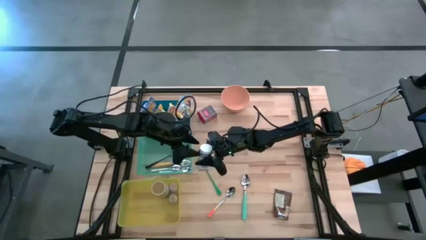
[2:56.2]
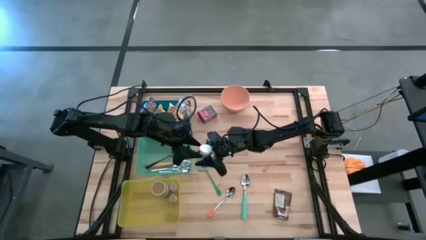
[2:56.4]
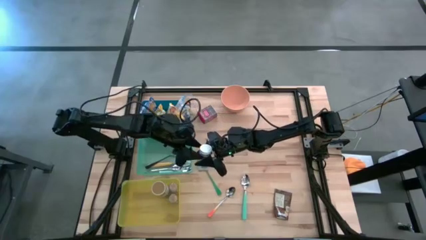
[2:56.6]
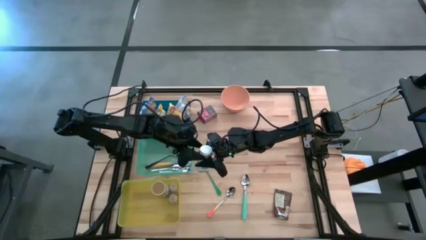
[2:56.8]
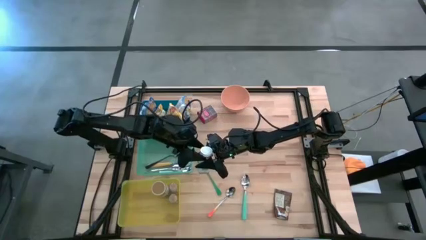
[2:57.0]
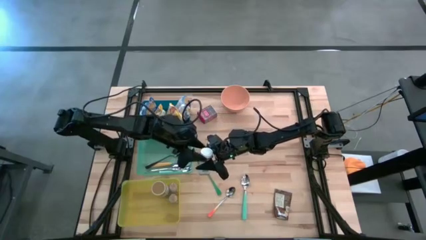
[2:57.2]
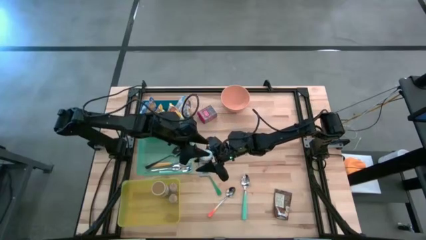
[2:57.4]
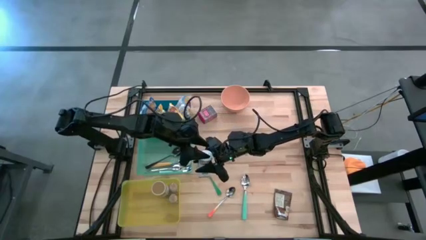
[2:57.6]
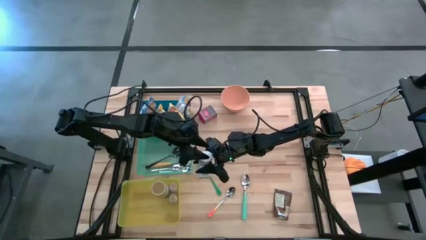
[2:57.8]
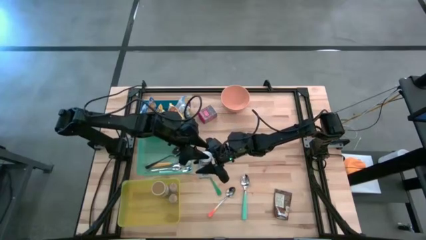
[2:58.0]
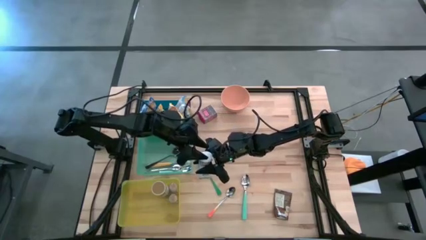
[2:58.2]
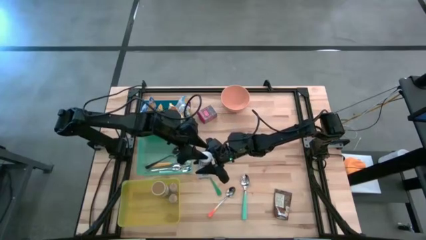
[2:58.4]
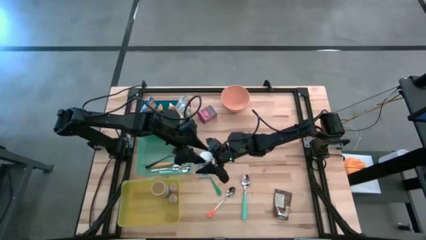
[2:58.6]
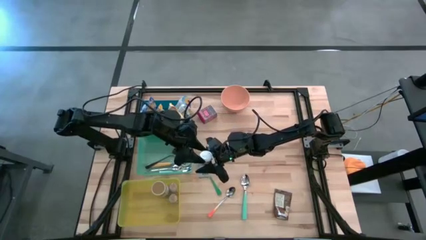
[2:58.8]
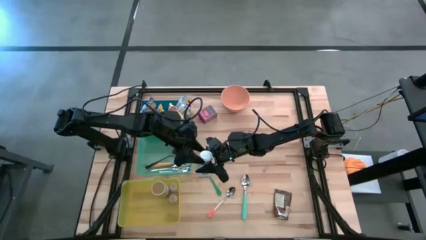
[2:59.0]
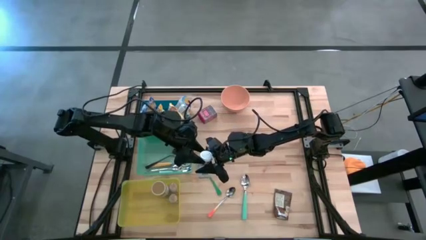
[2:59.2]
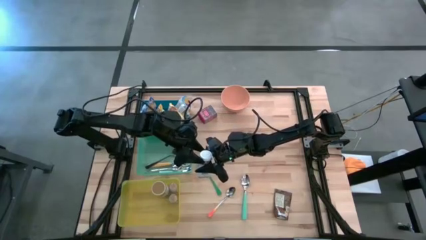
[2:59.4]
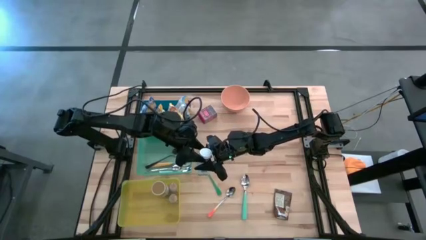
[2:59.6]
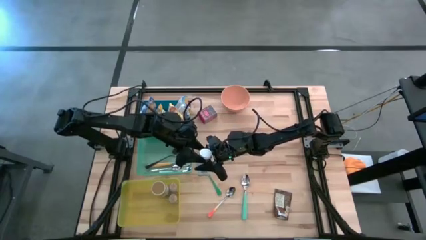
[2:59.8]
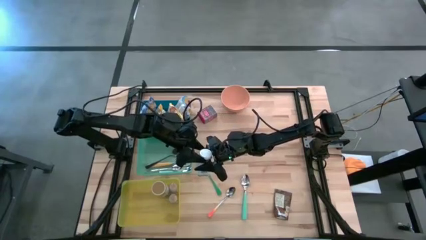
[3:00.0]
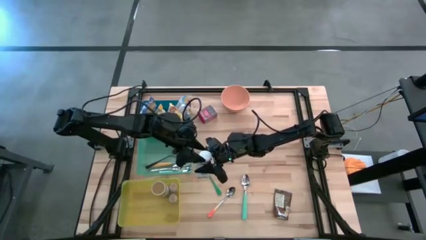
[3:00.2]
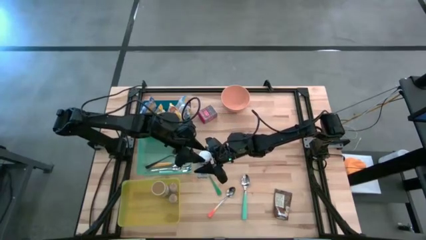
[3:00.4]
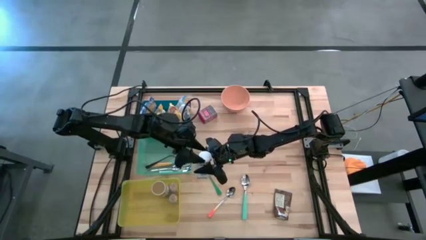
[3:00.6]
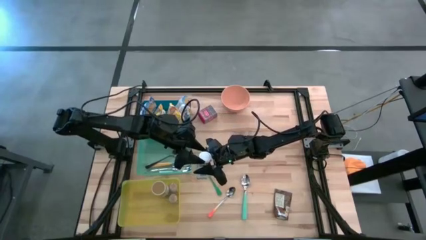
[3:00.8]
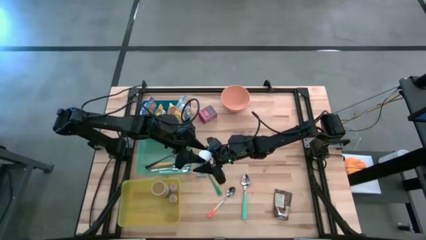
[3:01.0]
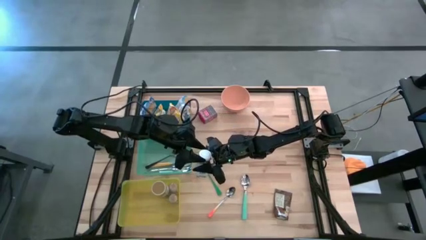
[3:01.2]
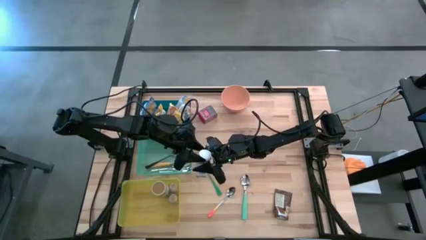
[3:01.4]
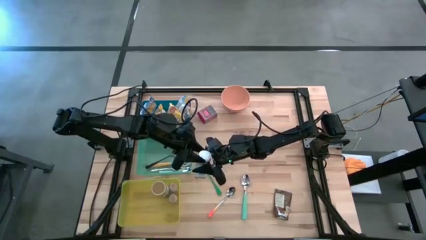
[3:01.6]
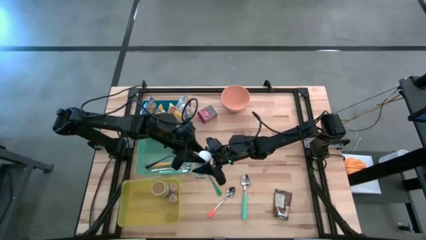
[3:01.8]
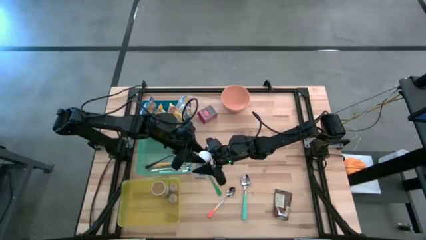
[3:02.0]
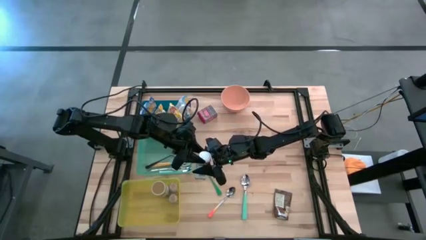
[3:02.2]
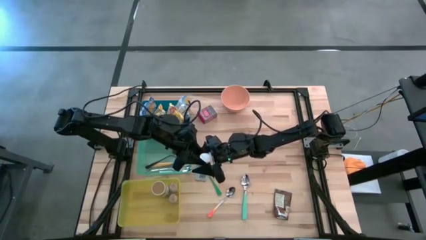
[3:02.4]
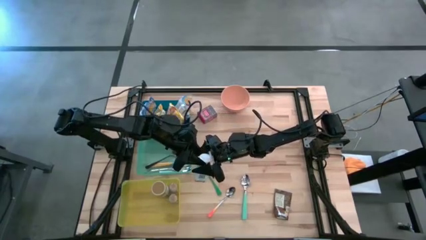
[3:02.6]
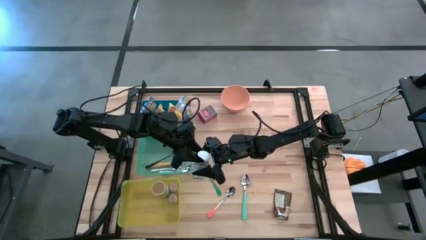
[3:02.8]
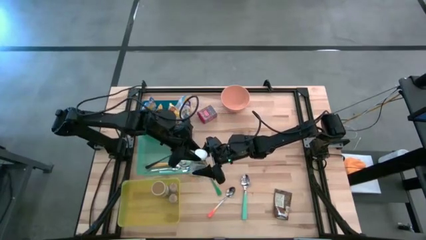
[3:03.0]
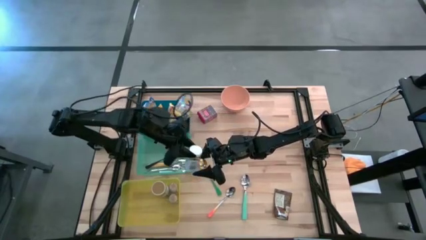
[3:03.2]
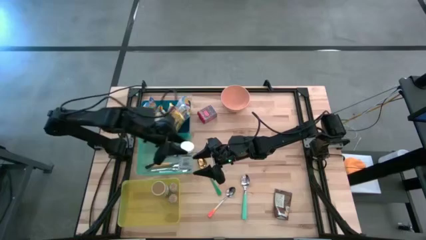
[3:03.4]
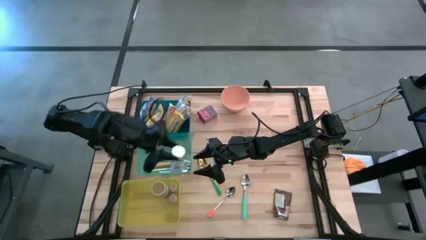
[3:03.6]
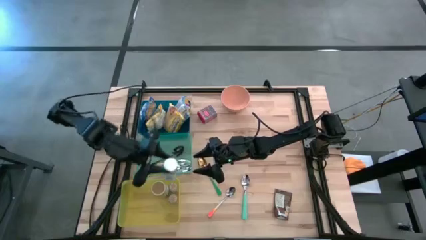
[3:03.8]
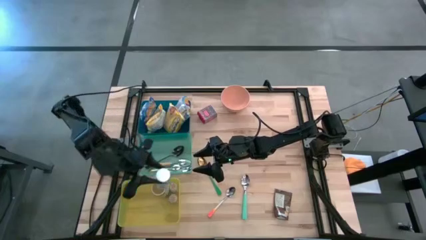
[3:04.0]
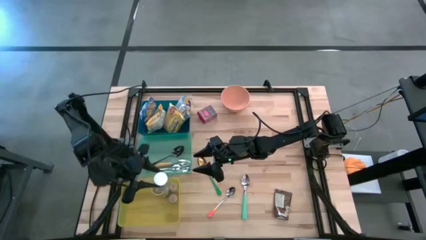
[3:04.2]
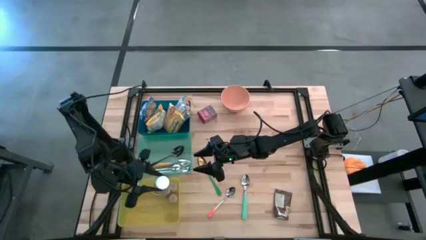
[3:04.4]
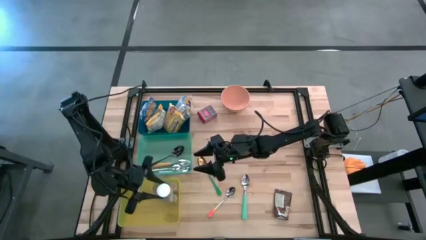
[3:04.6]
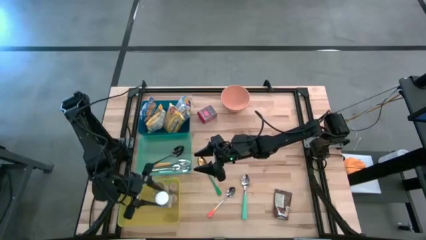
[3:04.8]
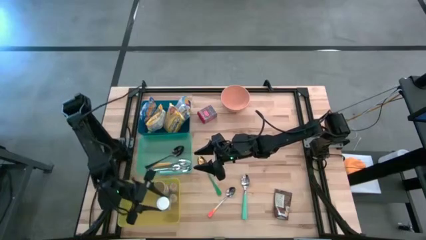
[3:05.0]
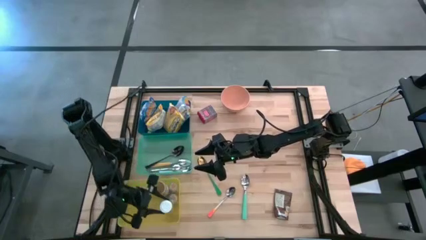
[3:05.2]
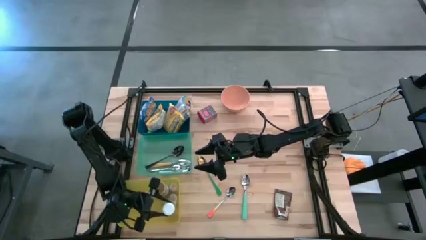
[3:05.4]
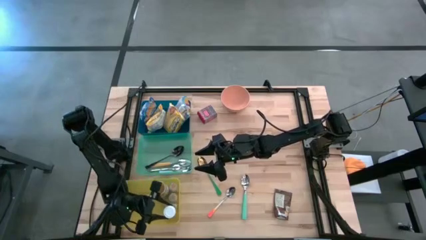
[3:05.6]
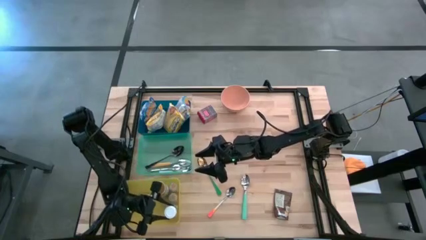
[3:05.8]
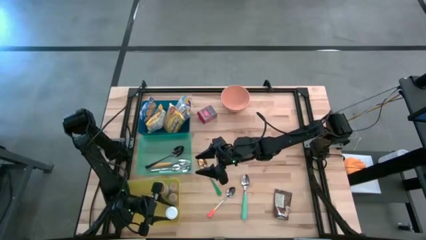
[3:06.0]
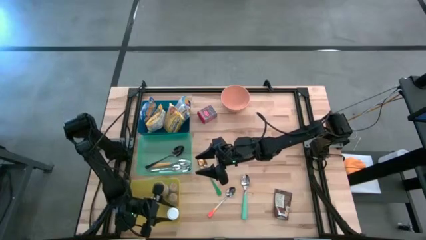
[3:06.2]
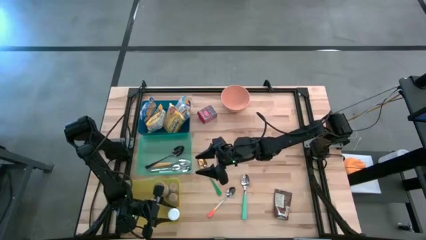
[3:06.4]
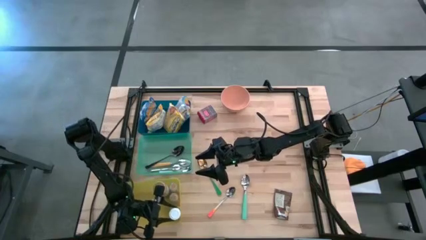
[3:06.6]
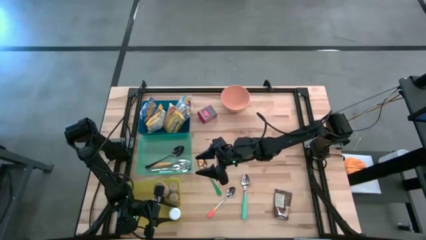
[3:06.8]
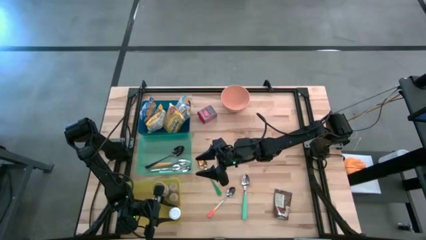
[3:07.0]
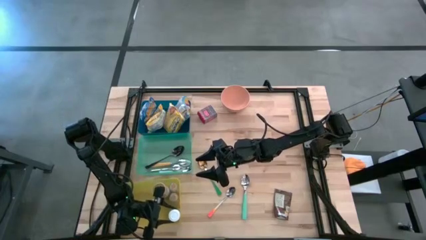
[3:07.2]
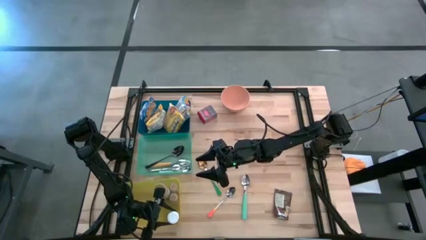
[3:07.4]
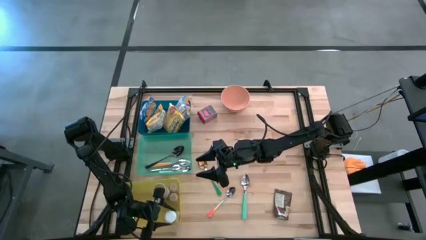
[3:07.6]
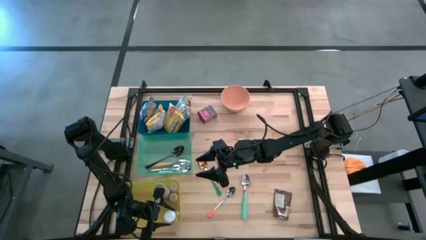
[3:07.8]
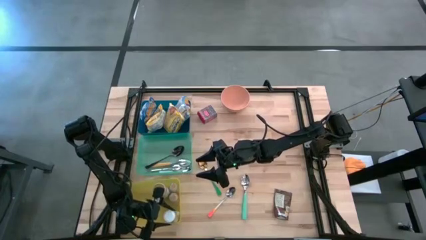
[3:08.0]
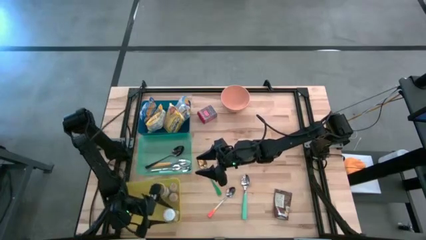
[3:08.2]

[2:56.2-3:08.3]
Put the white seasoning bottle into the yellow bin
